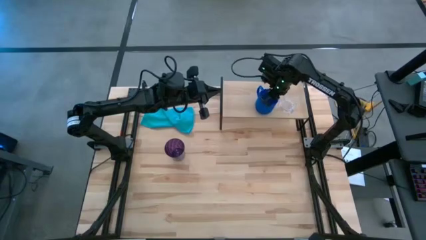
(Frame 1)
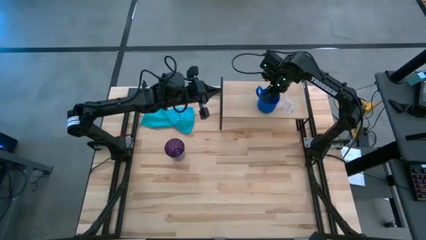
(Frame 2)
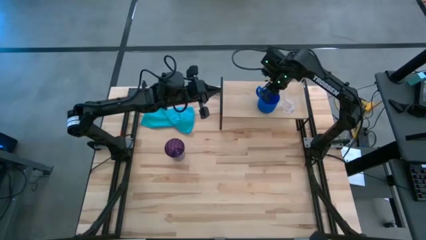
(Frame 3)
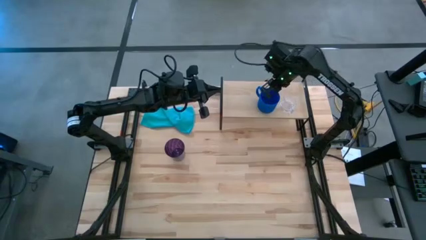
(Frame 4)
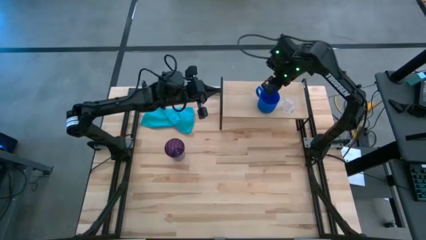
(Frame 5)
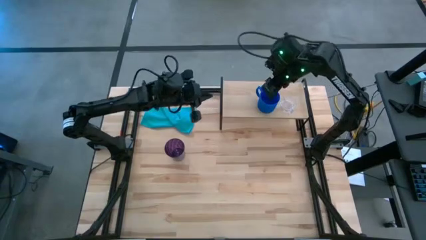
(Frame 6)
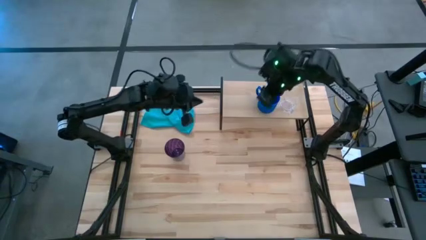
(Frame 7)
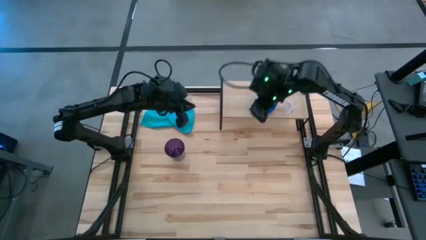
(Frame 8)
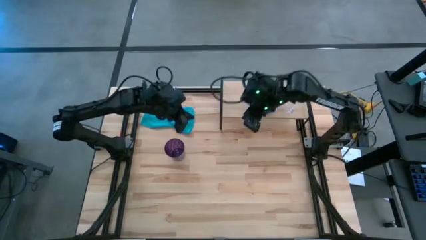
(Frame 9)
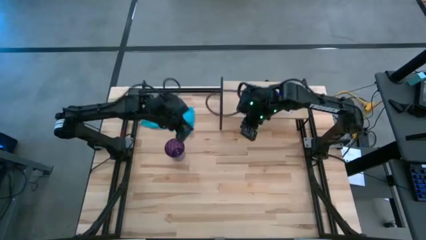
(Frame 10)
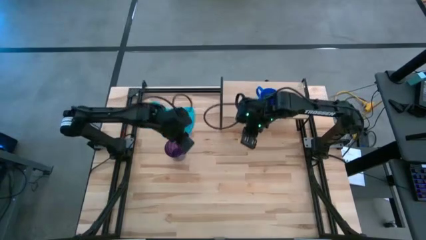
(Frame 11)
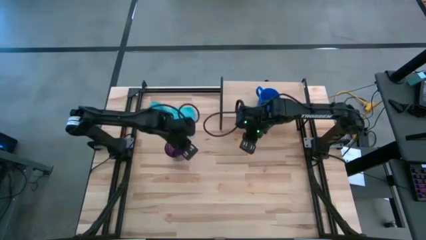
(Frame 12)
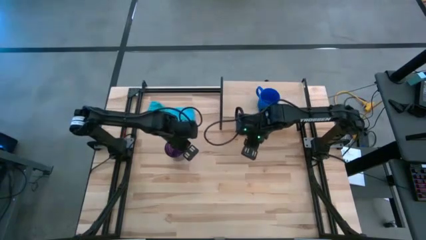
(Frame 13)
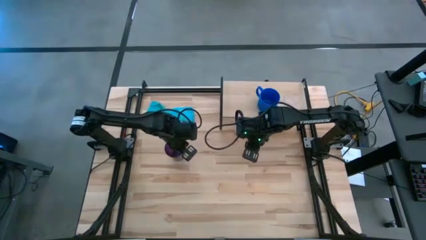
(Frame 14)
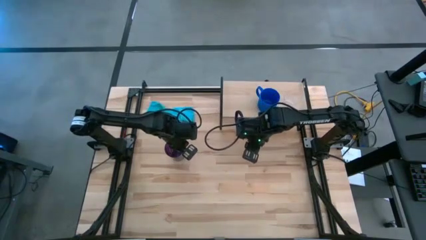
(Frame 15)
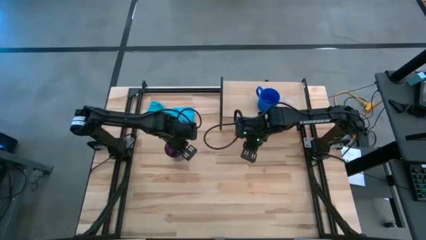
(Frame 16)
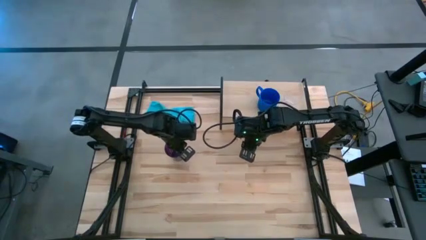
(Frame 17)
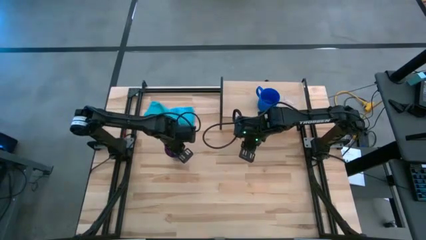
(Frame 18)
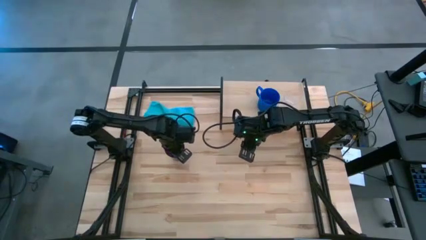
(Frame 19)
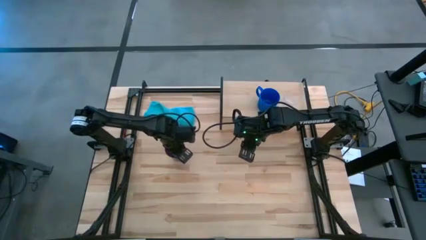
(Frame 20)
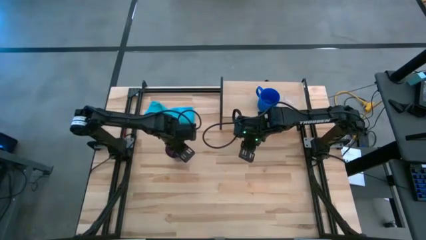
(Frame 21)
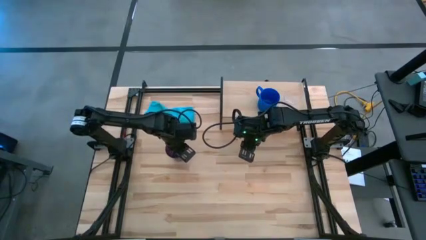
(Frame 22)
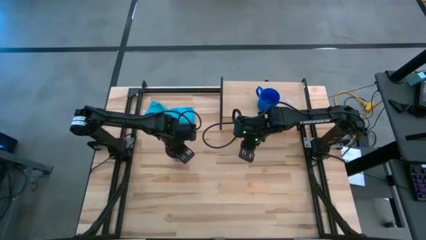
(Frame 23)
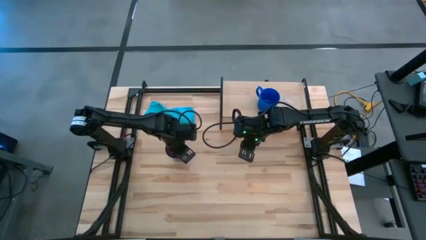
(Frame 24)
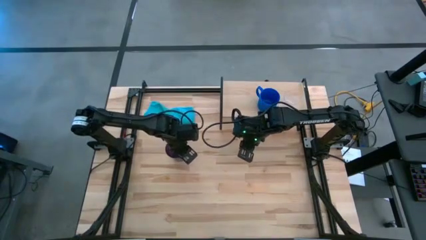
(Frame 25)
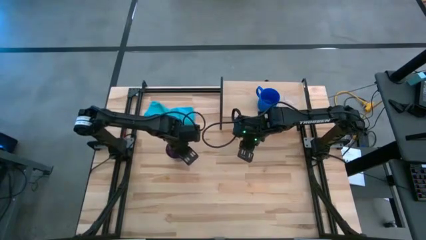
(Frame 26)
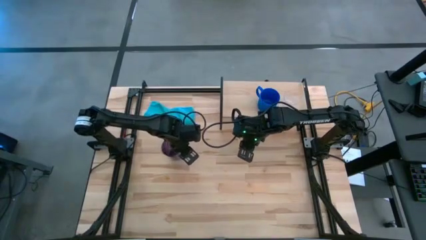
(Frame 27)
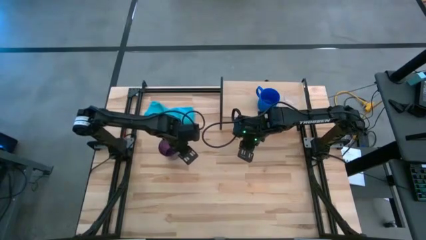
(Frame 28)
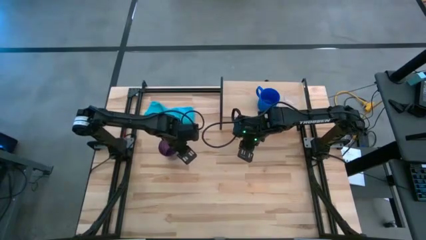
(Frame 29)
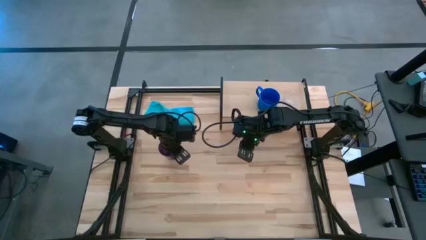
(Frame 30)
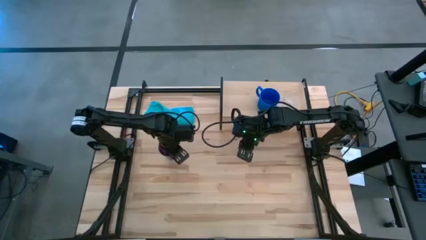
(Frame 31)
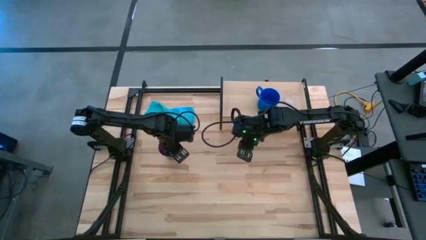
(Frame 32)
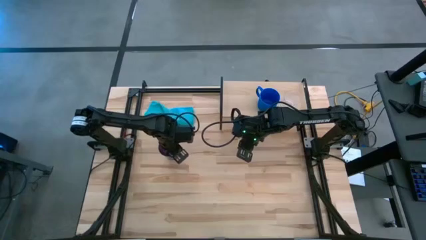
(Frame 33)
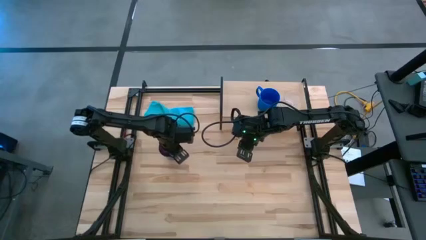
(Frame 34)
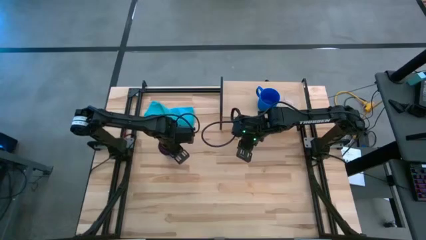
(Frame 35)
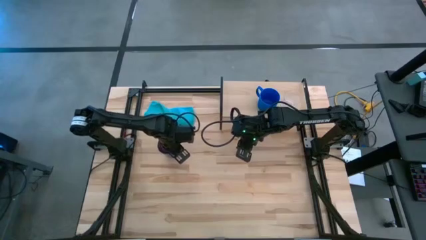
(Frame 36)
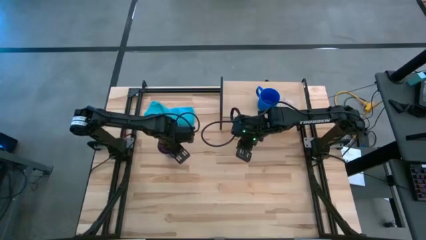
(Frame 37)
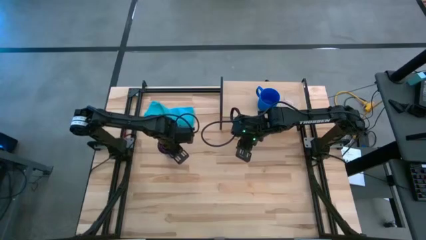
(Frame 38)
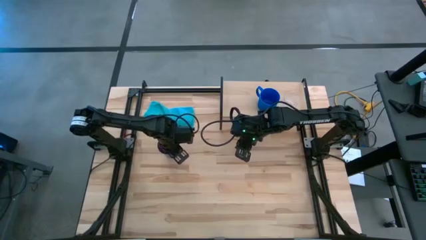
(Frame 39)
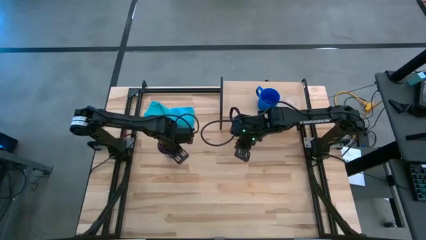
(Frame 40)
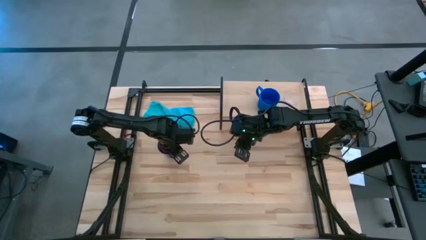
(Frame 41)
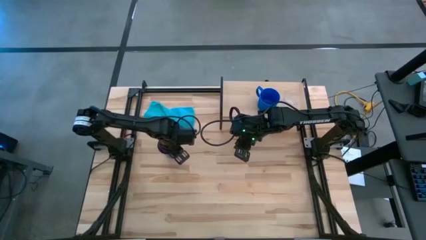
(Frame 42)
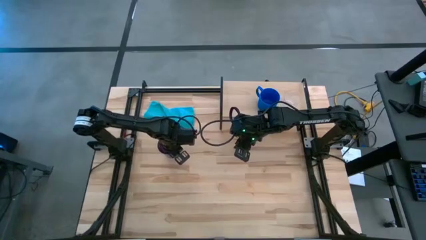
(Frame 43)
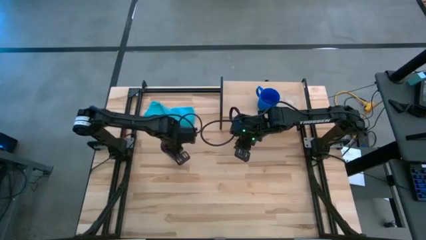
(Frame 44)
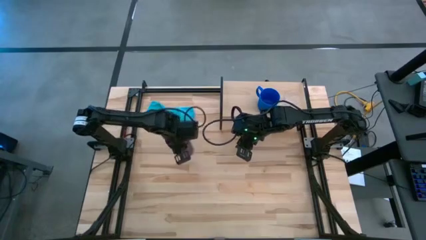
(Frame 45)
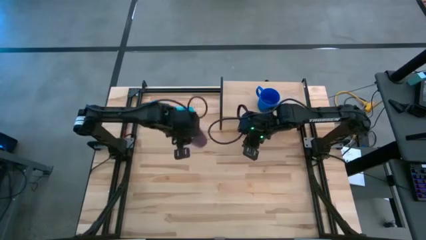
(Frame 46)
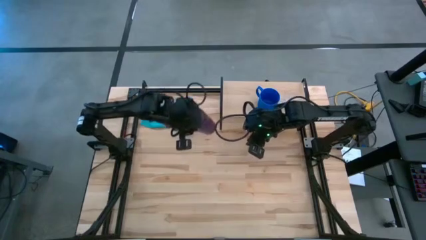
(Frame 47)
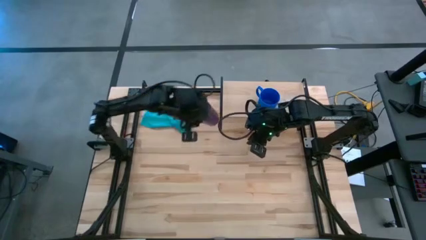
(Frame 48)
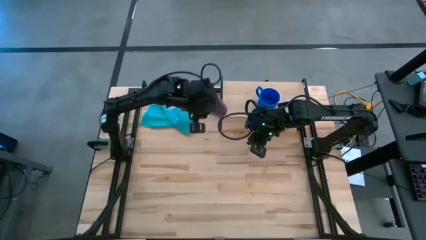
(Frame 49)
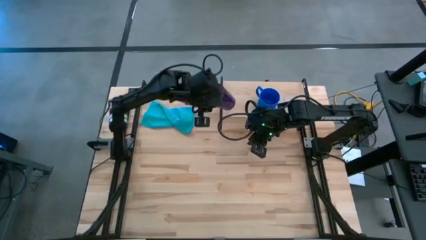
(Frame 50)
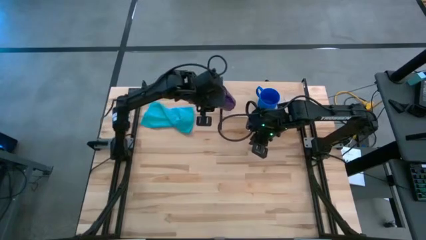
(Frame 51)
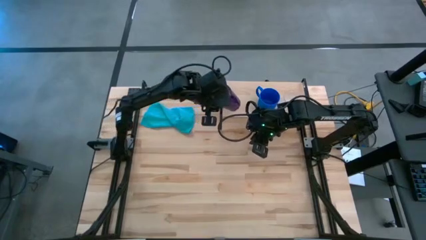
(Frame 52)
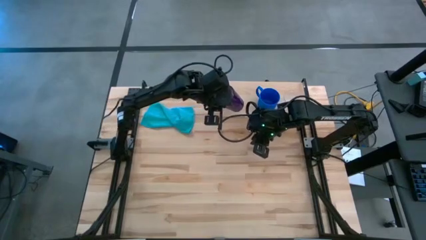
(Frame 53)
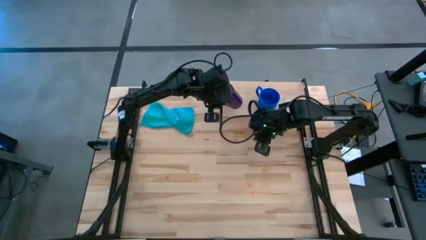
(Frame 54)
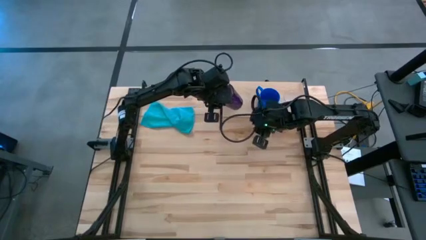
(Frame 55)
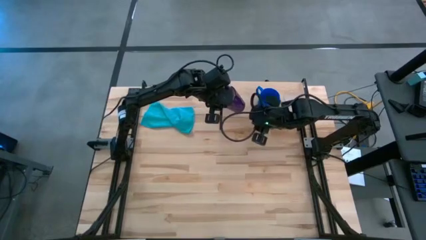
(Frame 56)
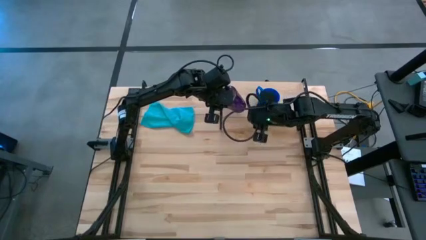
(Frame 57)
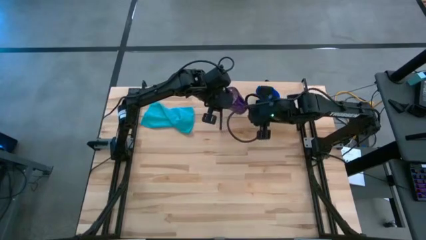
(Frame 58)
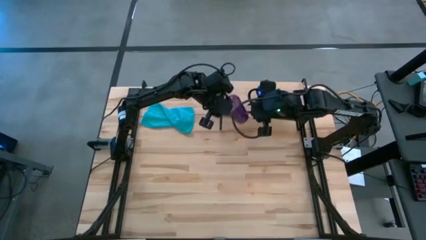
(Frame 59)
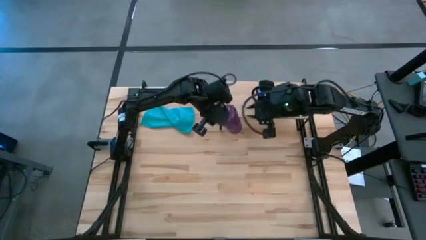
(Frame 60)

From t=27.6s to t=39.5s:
Task: Stack small to large cups/mugs on shelf
Put the purple cup into the shelf

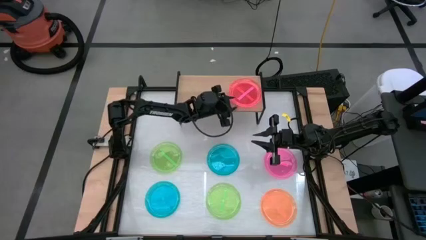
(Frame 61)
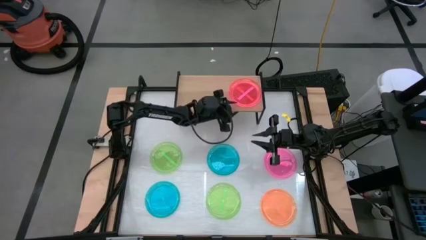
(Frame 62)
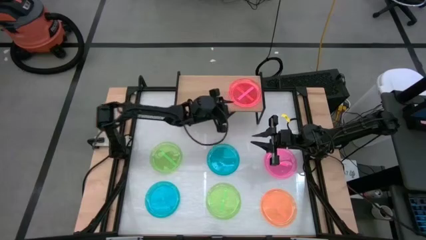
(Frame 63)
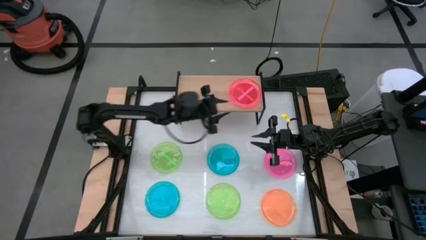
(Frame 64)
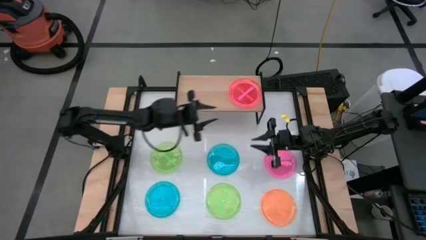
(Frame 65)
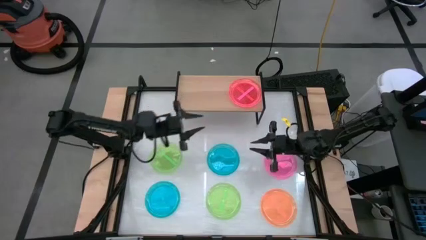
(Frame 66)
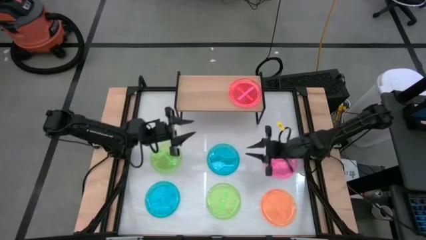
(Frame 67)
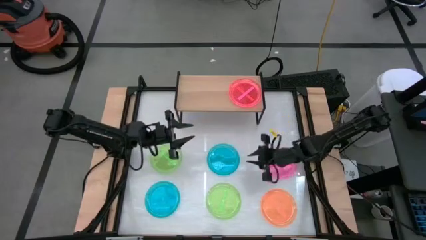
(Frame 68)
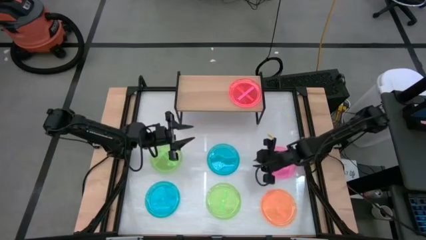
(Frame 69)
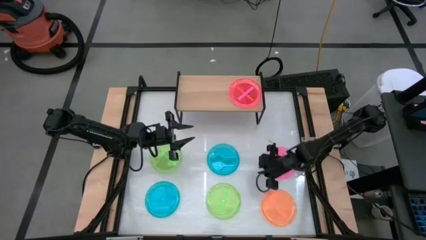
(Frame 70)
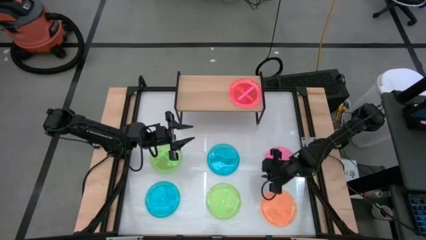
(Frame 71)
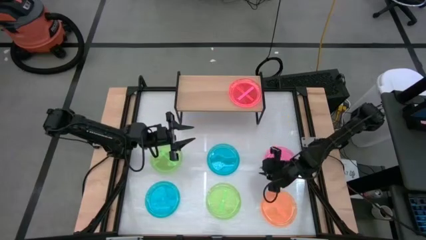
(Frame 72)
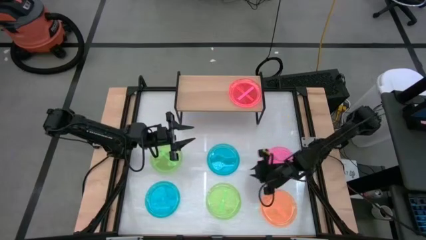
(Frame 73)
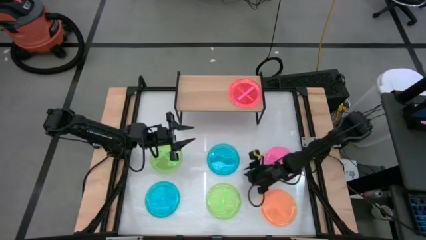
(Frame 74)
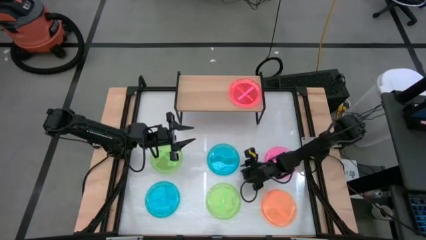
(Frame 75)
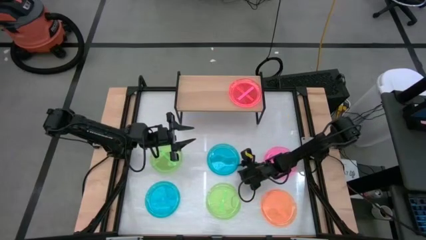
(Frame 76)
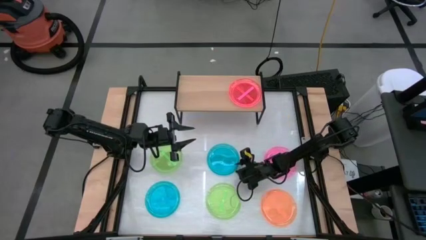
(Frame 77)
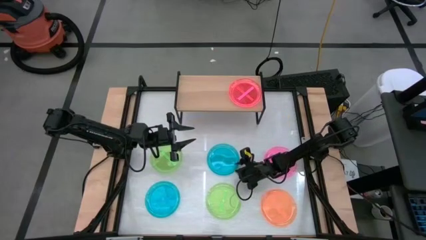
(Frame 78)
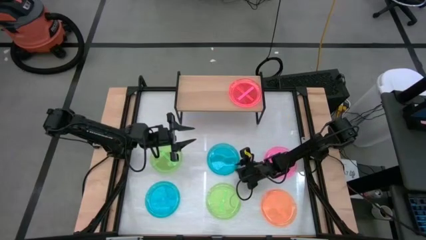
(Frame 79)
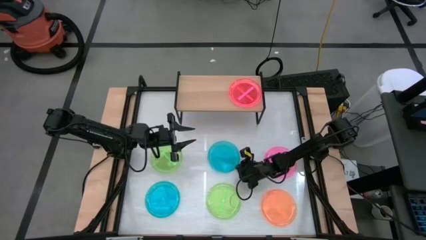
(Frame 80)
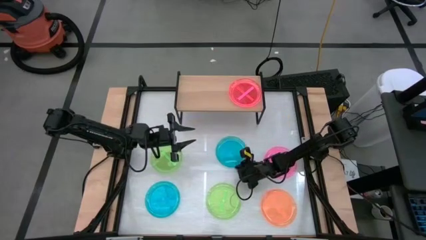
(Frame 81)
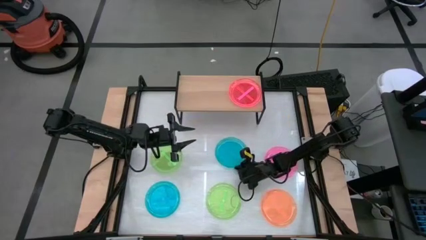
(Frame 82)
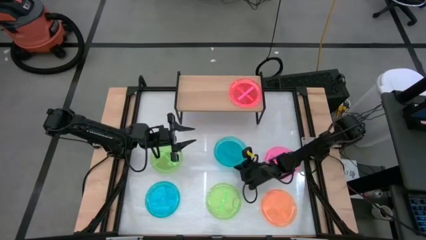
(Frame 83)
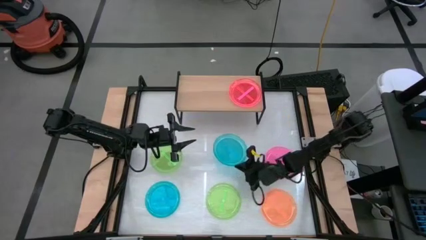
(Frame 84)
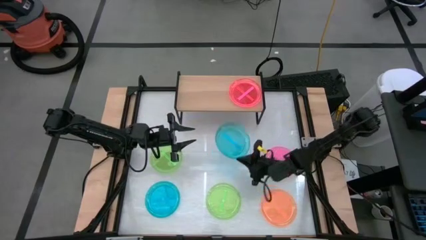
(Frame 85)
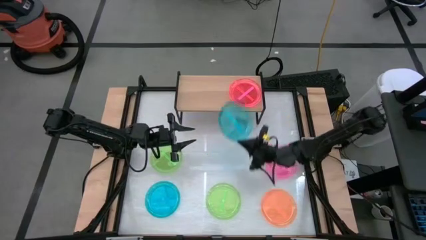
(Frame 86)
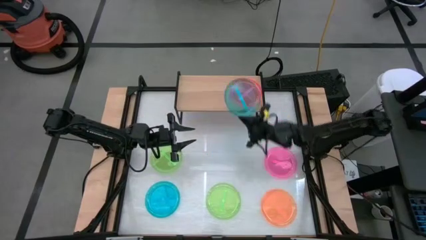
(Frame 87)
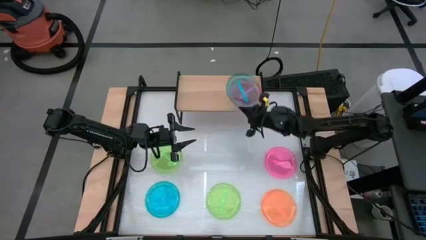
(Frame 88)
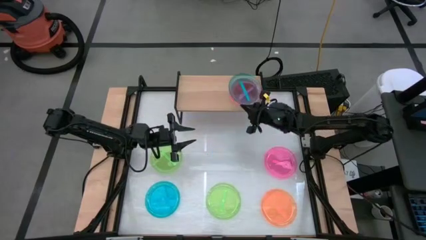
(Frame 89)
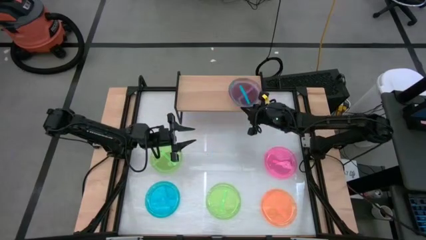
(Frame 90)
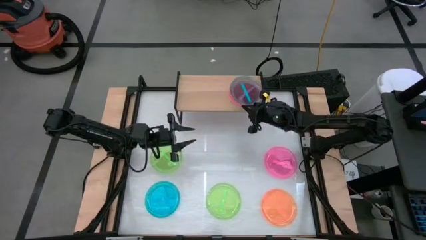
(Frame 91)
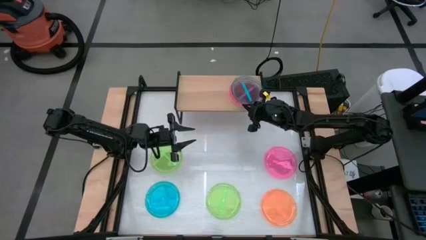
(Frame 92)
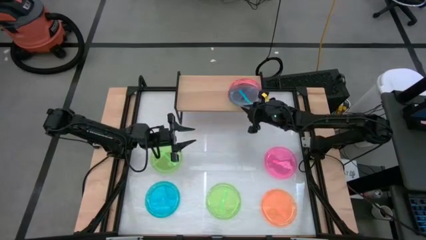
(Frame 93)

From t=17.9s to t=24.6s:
Task: Place and stack plates onto a shelf
Stack the top blue plate on top of the pink plate on the shelf
